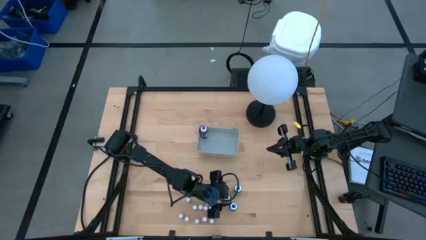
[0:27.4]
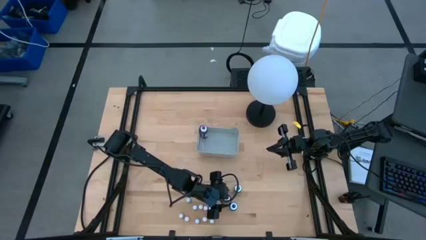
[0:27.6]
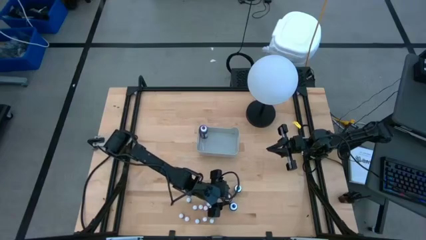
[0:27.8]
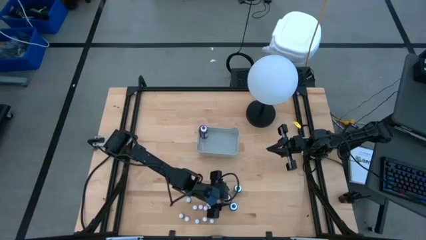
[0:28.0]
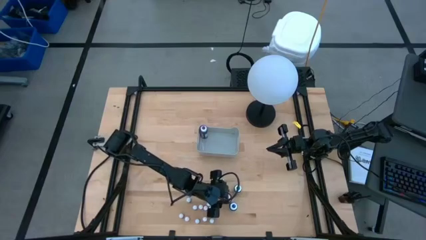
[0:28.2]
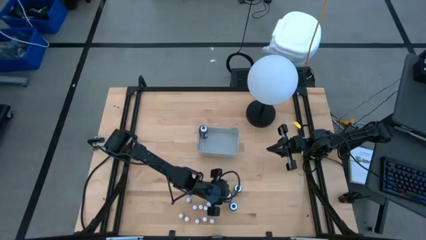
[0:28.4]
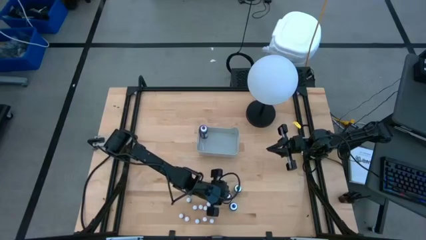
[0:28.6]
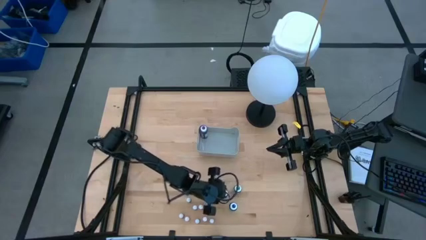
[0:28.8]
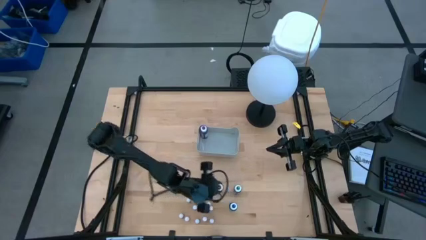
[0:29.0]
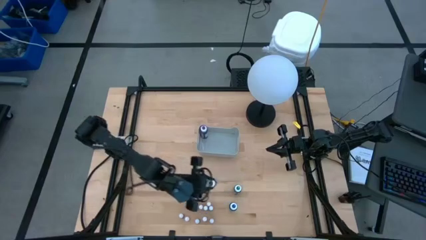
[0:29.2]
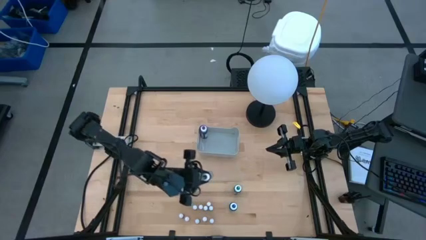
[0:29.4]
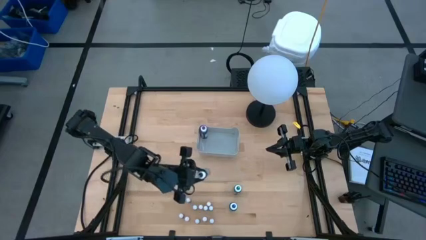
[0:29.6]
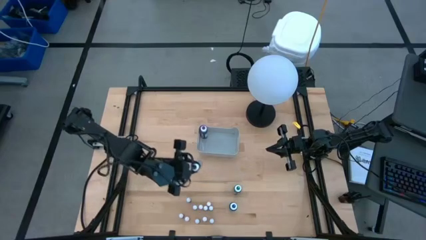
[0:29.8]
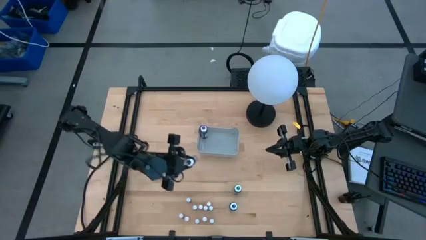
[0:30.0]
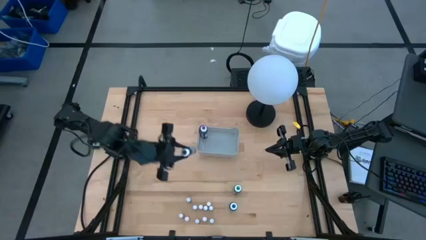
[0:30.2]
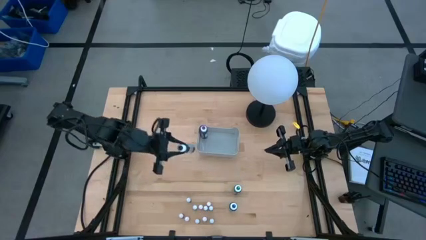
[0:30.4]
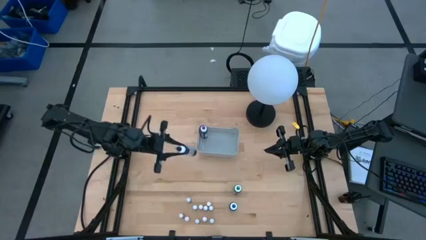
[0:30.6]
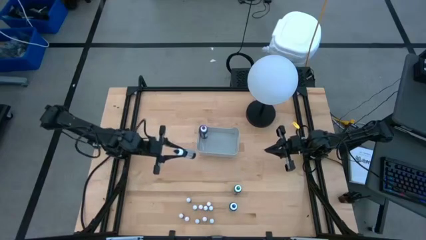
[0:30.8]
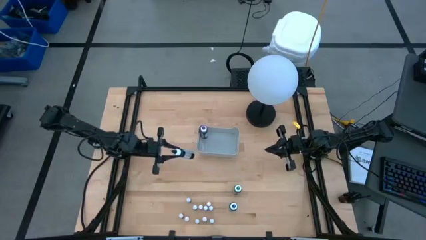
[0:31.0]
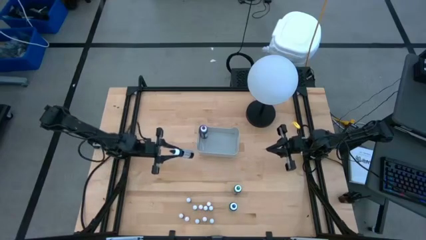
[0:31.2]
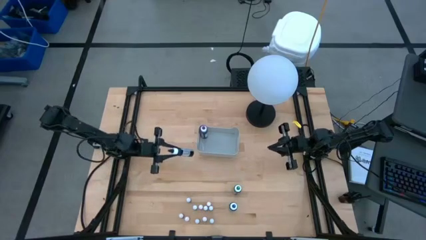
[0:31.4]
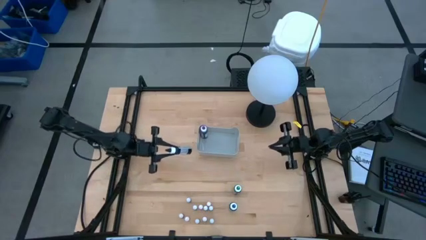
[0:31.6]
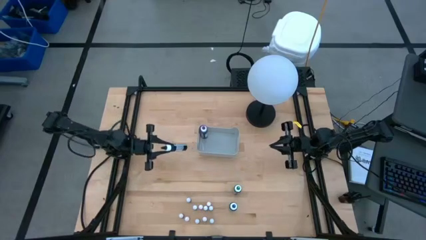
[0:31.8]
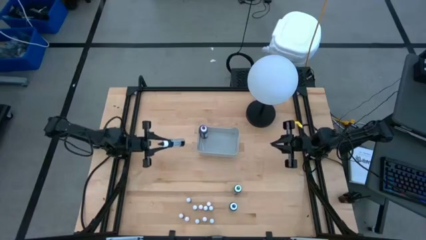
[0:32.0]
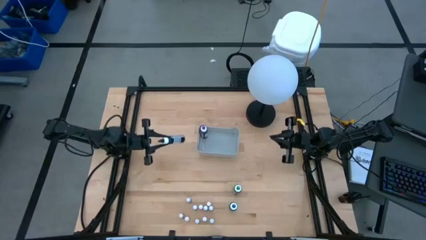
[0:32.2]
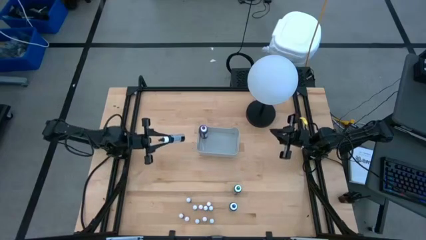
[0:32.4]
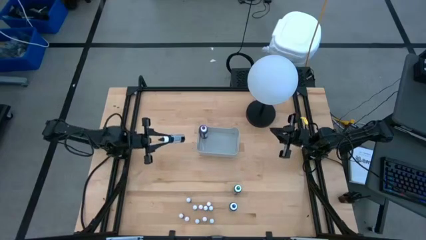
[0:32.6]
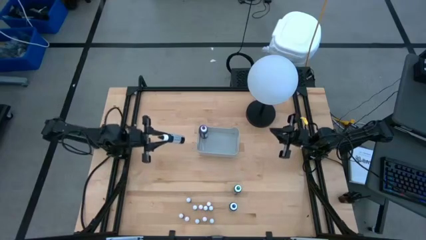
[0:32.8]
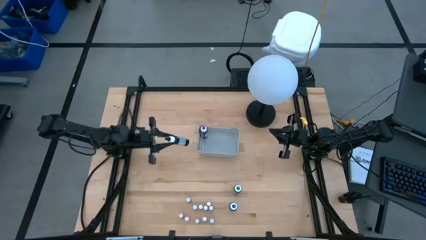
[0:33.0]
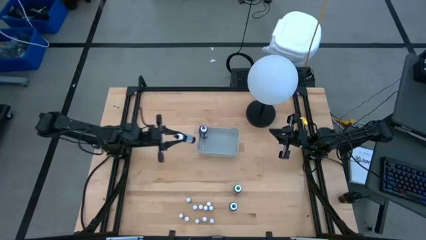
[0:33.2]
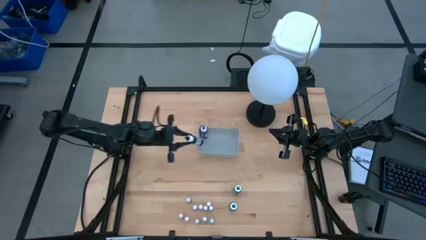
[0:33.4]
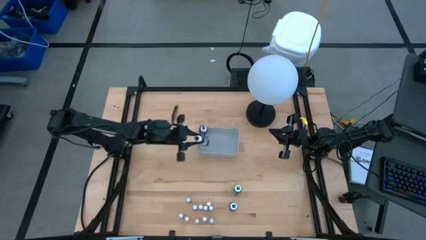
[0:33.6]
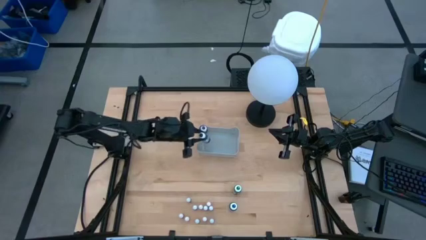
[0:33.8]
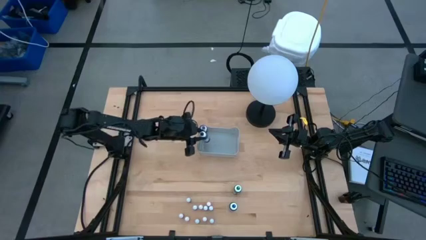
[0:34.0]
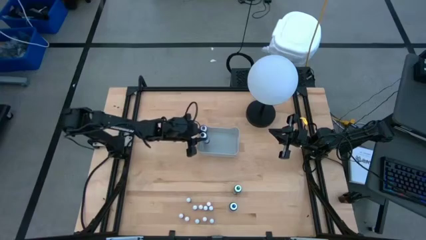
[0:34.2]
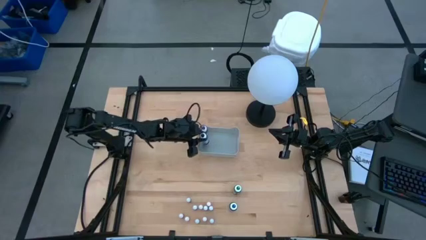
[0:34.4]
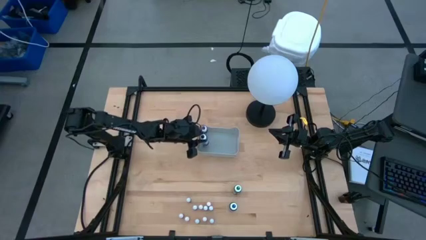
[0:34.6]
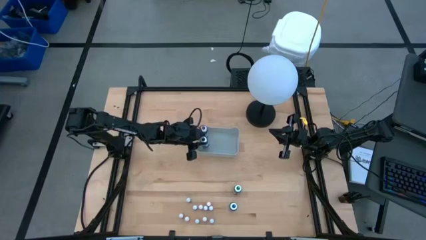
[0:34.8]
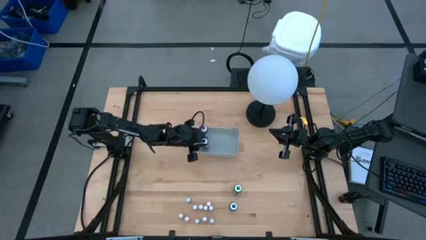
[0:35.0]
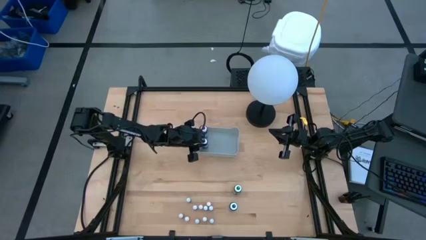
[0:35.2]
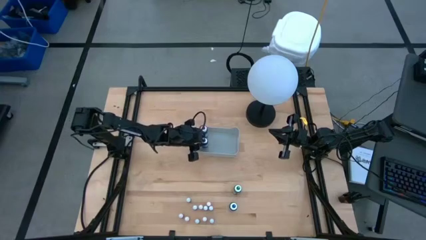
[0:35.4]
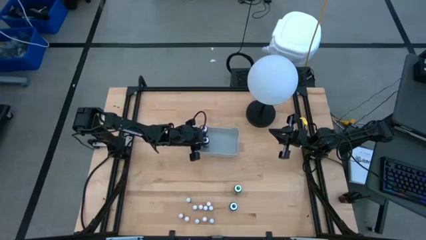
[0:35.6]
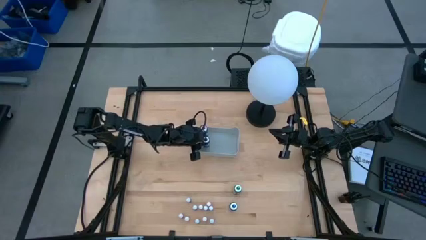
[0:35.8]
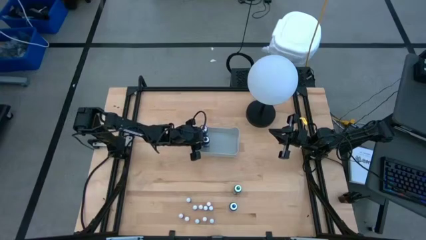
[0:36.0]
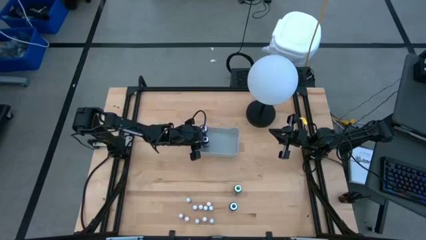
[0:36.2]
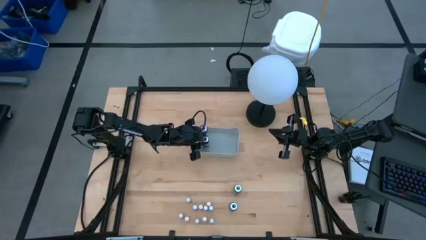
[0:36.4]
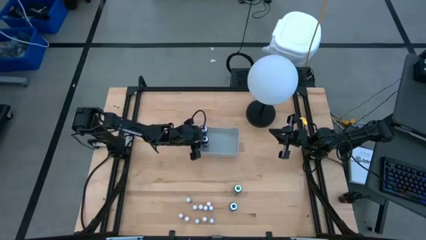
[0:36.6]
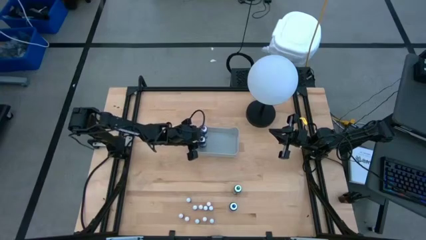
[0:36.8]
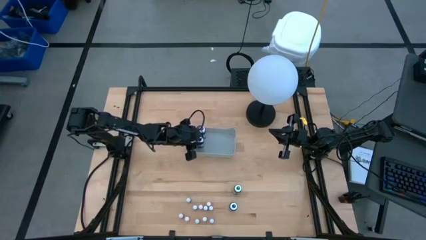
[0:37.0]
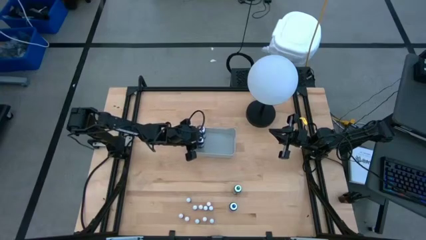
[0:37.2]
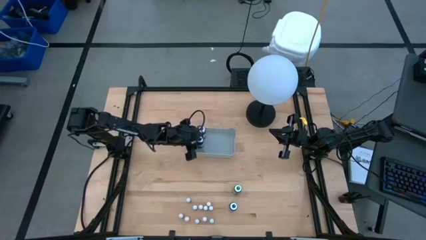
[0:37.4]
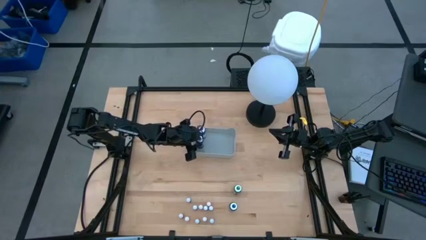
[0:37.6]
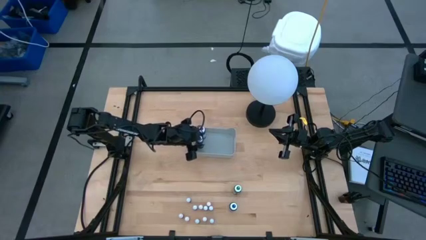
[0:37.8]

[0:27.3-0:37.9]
Task: Pick & Place food coloring
Put the large black food coloring bottle into the gray bin

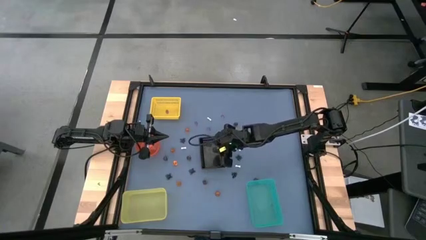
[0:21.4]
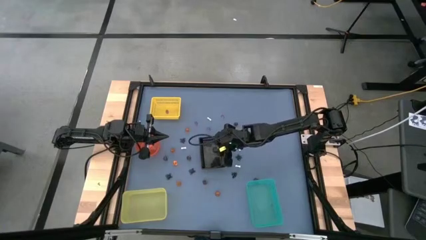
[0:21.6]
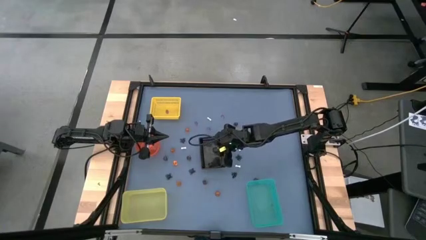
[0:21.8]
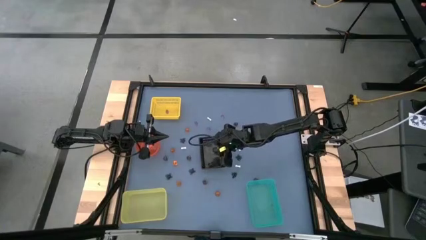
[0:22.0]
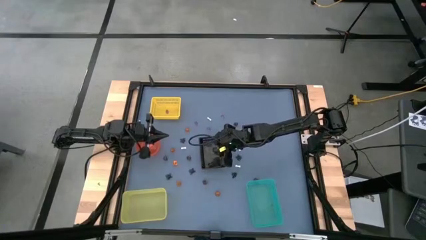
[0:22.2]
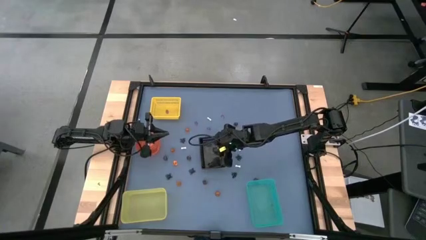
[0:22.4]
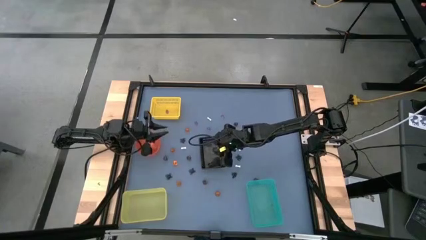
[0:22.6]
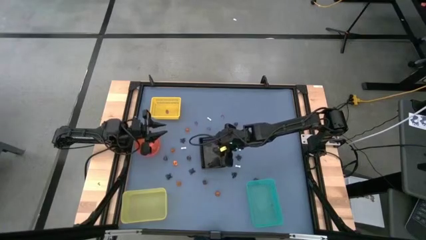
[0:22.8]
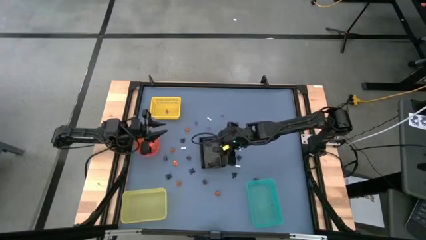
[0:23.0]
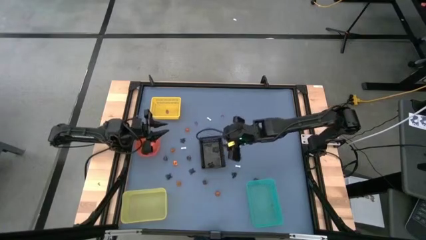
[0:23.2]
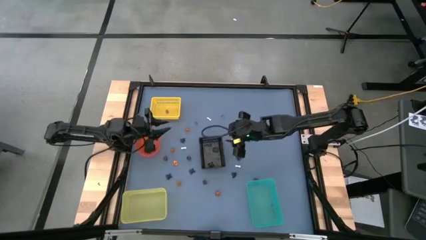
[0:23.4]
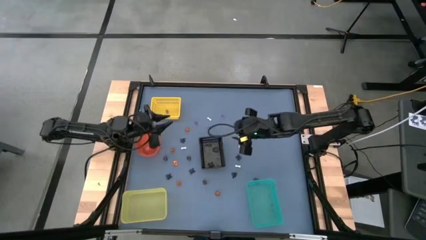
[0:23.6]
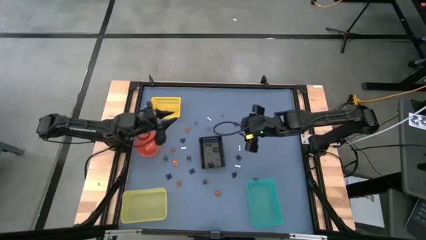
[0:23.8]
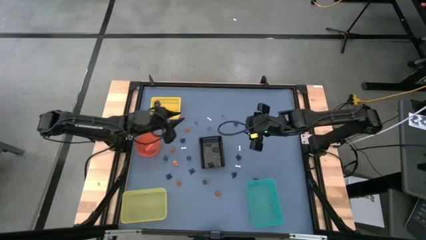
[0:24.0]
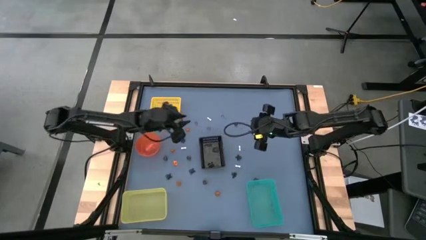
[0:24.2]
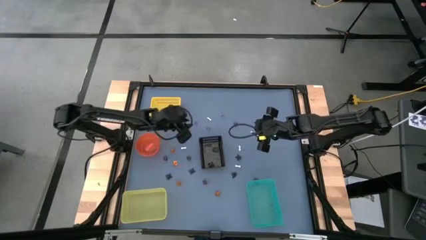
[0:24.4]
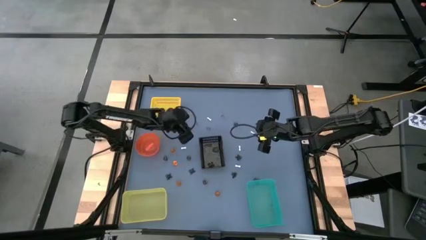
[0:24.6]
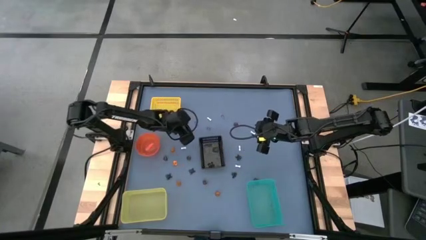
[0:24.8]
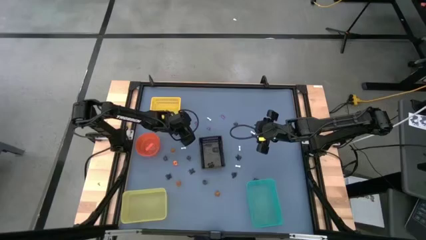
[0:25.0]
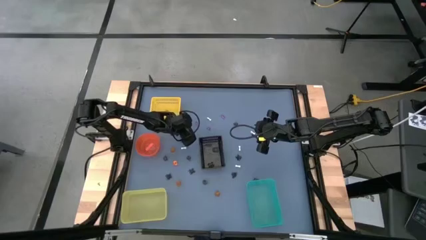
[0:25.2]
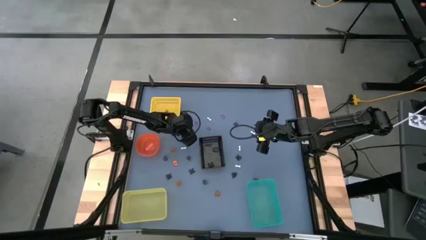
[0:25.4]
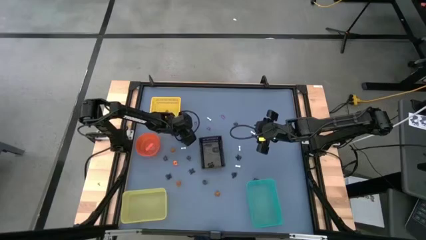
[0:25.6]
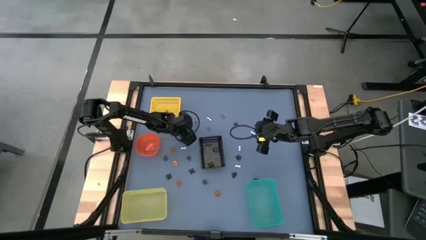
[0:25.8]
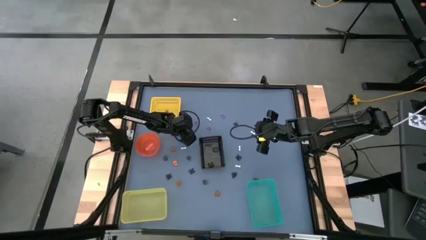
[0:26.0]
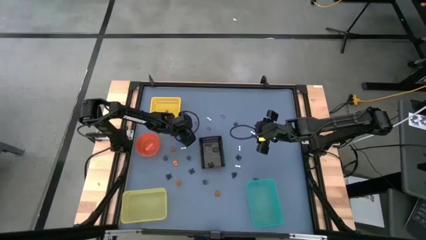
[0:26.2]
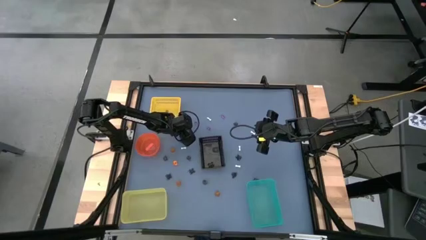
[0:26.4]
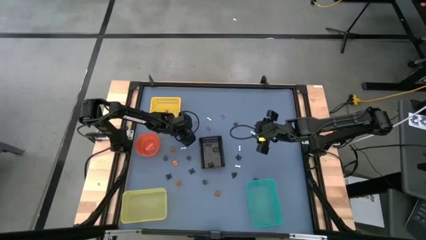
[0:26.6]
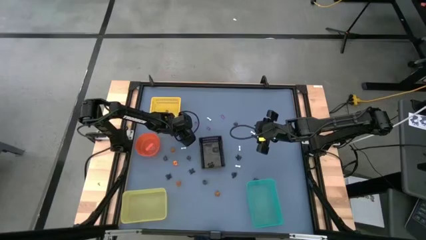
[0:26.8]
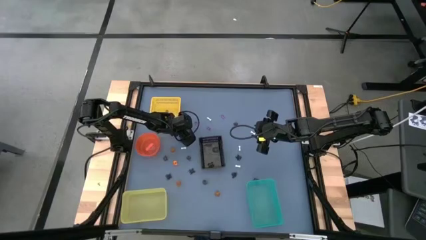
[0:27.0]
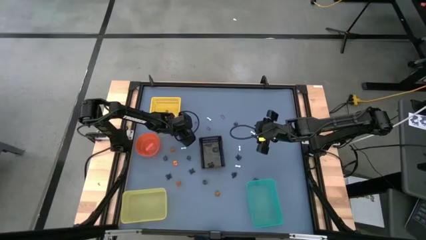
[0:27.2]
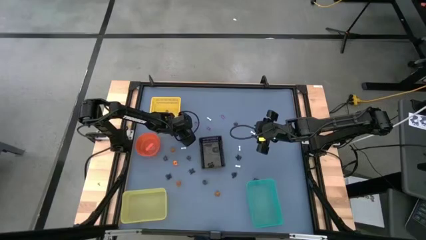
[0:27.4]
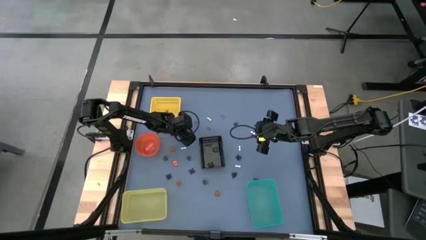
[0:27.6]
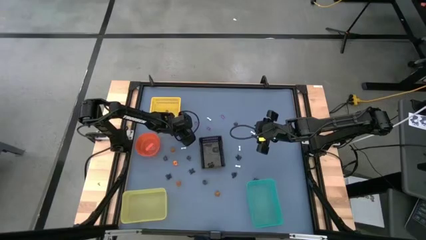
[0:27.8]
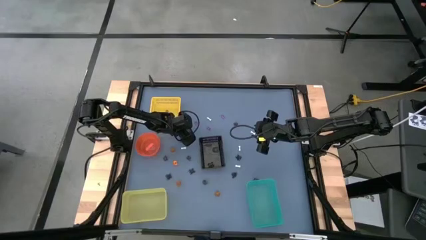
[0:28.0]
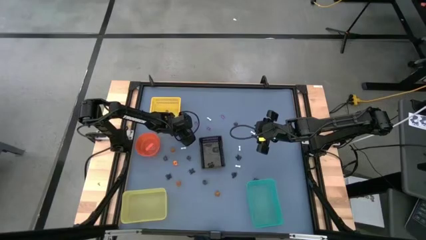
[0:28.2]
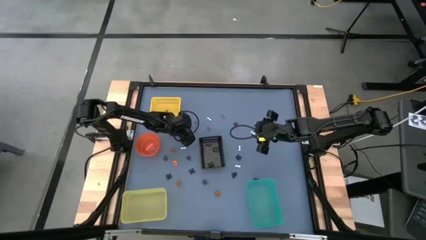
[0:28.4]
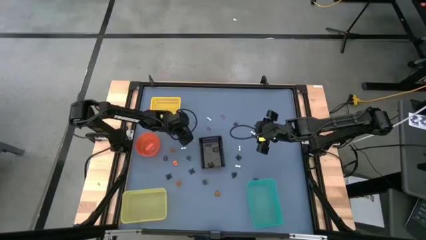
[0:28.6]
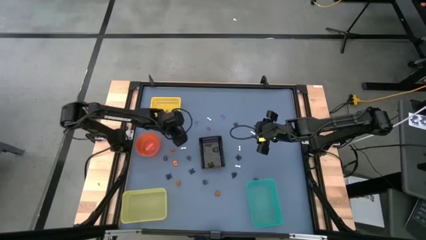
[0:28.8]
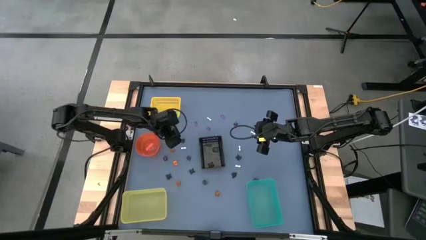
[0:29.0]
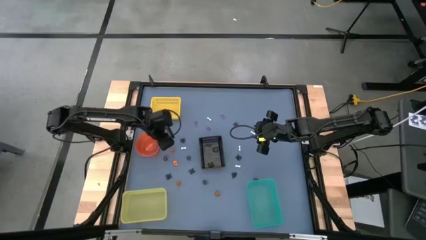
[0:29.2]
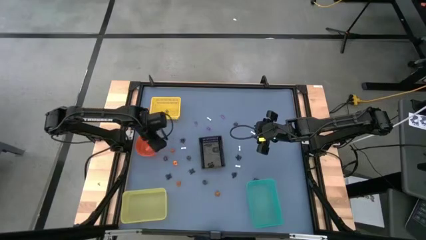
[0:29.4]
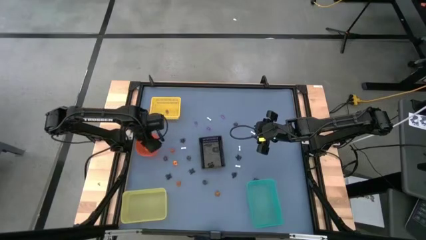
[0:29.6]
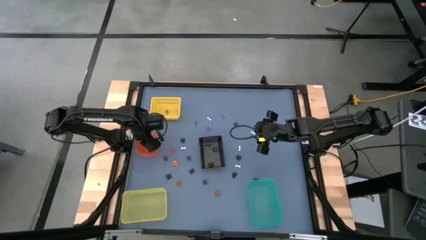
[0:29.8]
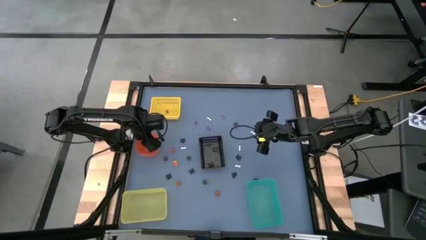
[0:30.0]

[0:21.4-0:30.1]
Task: Sort Halloween decoration
Put the orange pumpkin toy into the orange bin
